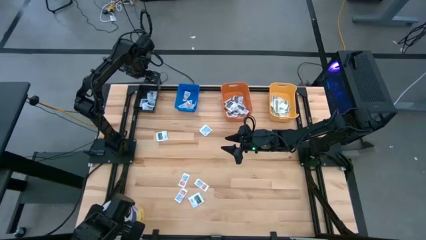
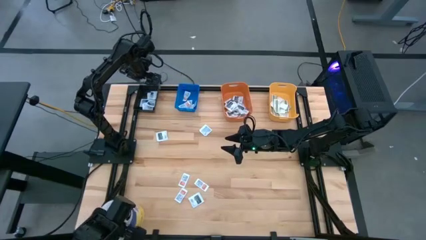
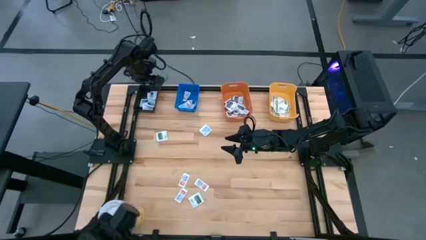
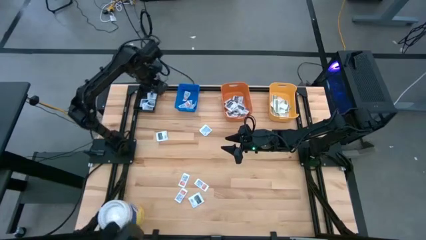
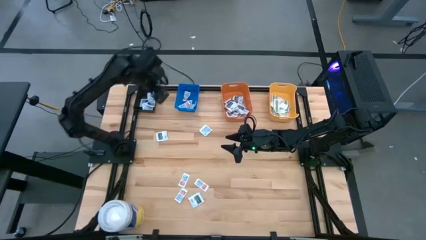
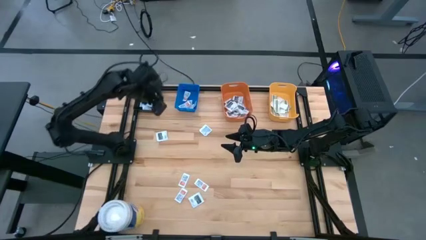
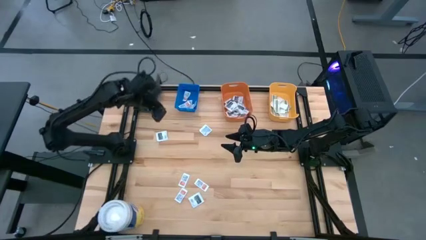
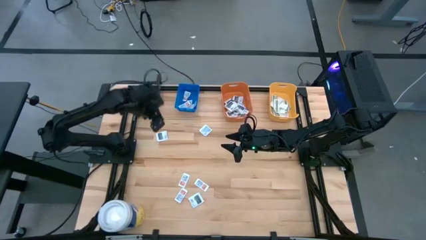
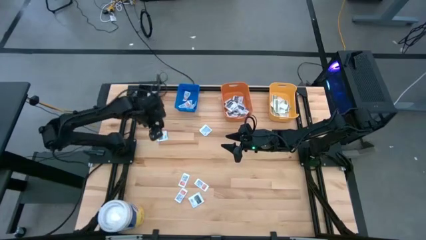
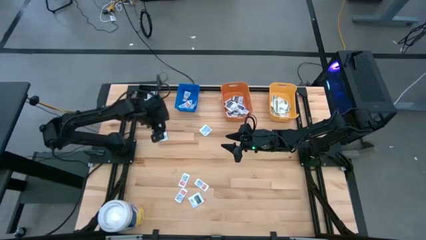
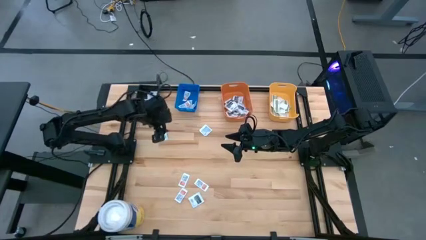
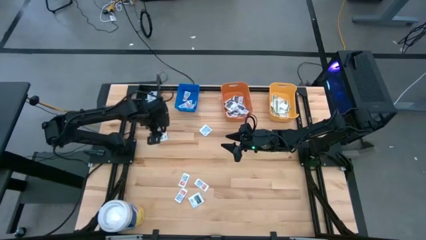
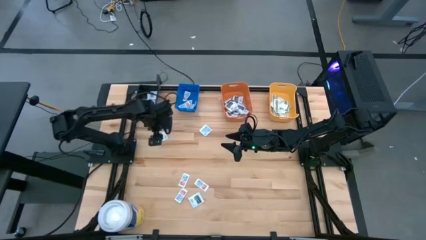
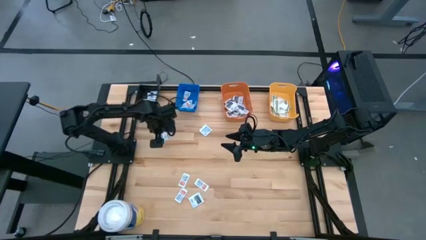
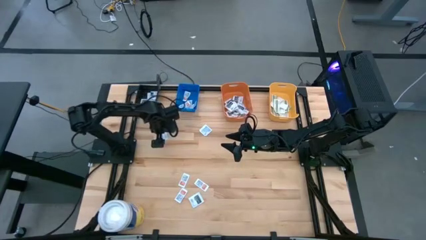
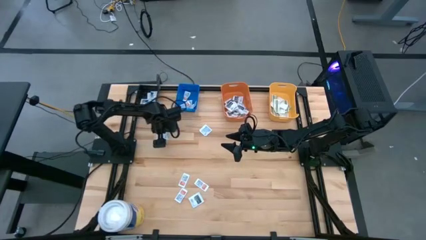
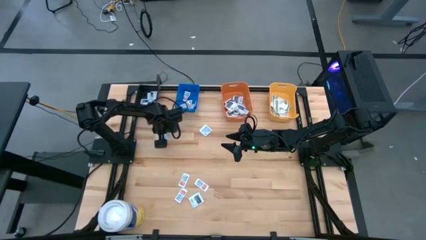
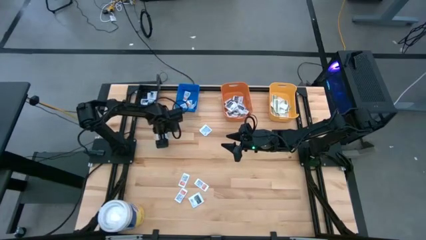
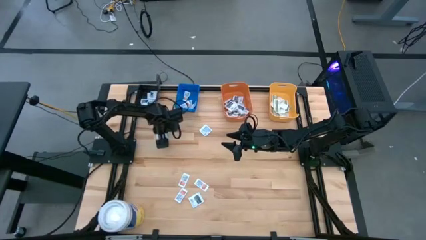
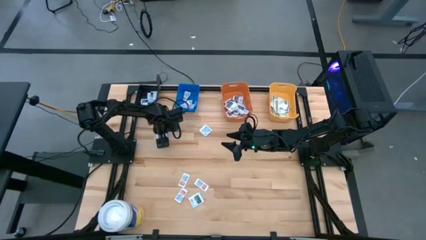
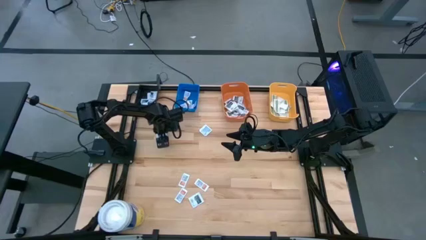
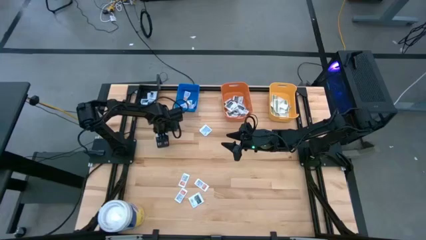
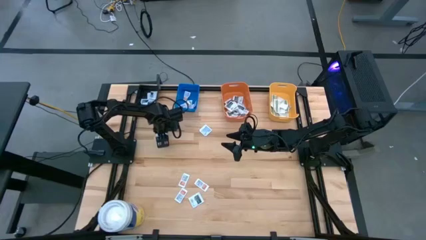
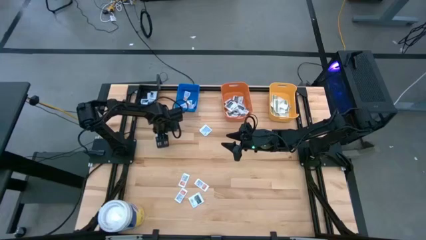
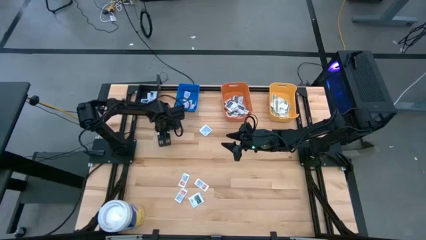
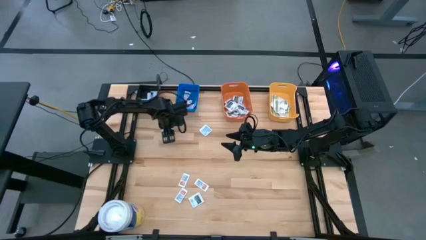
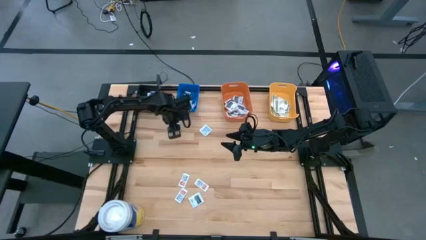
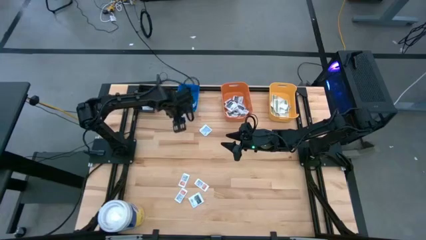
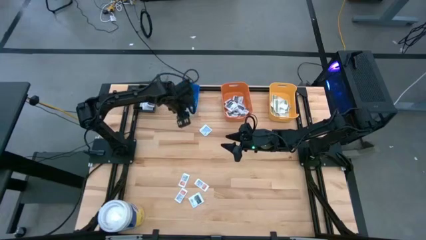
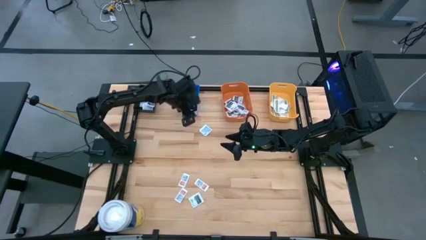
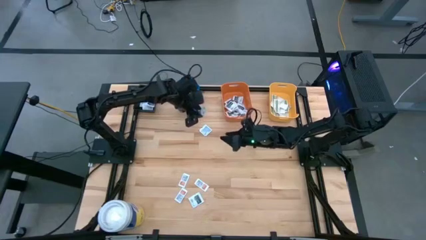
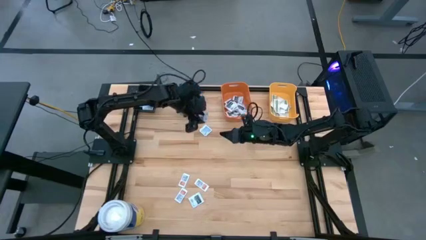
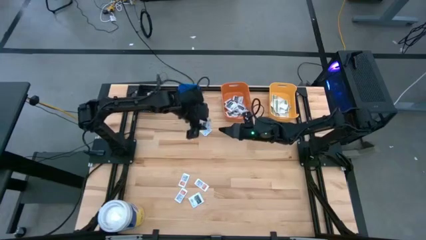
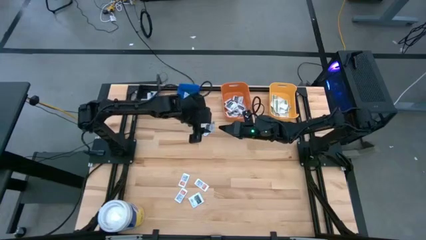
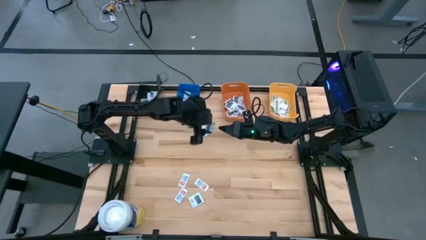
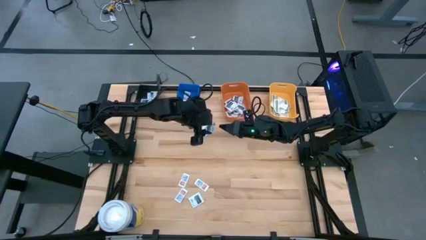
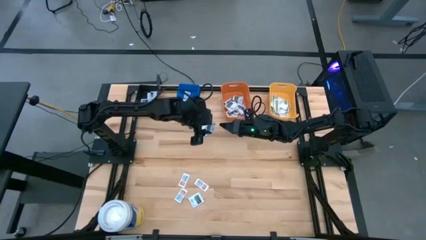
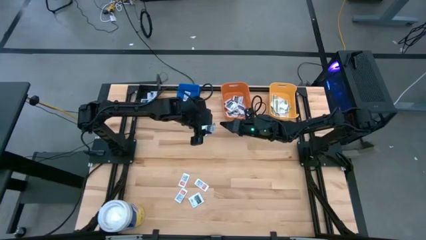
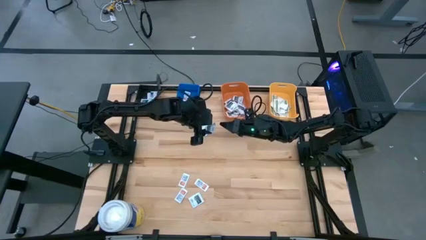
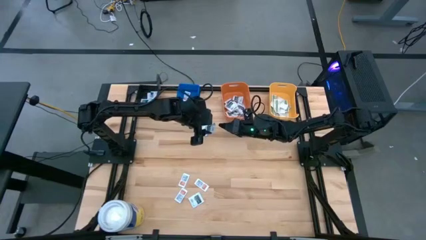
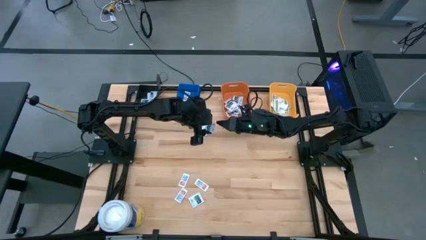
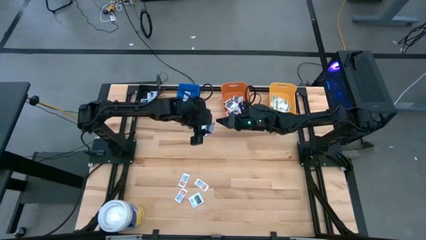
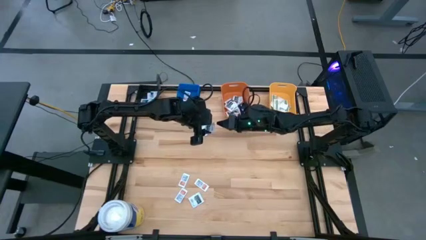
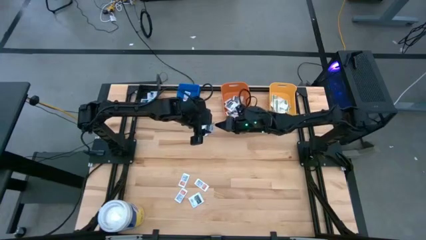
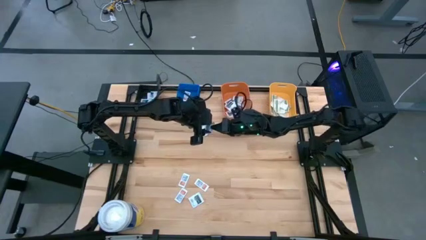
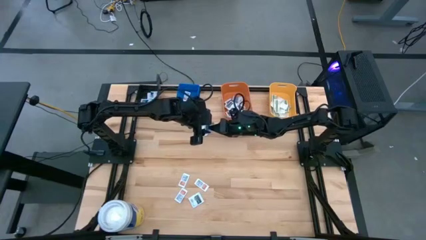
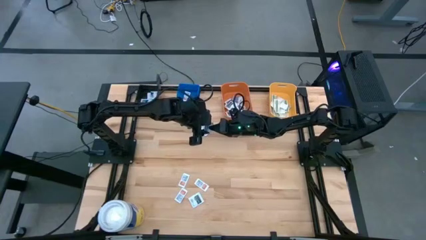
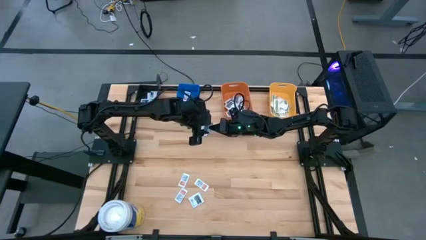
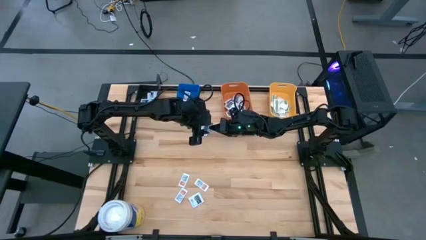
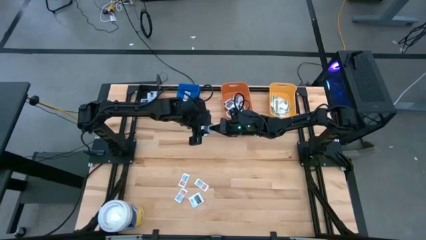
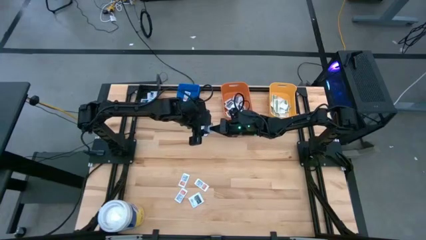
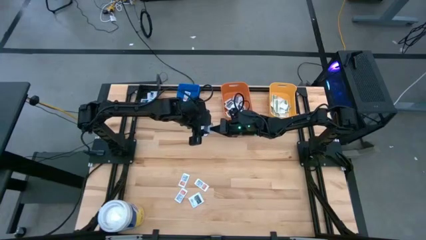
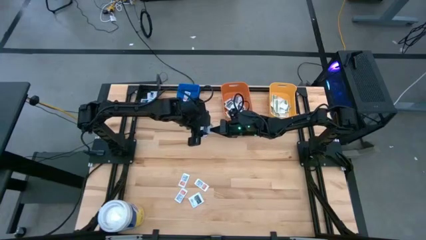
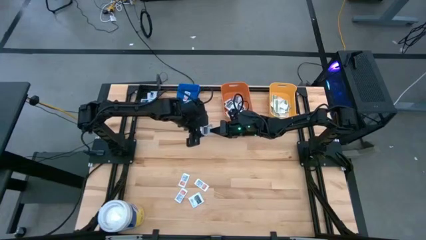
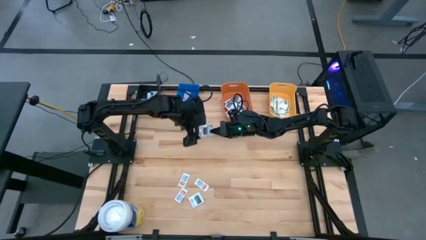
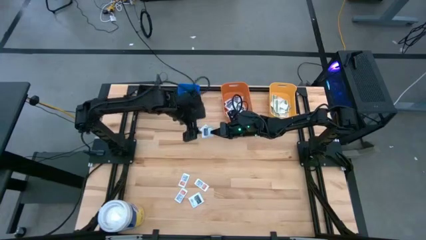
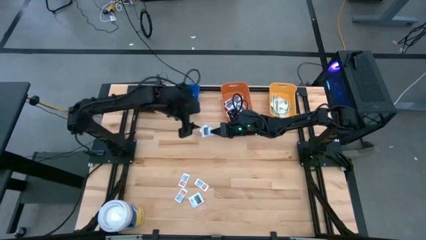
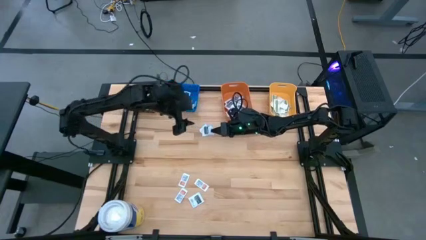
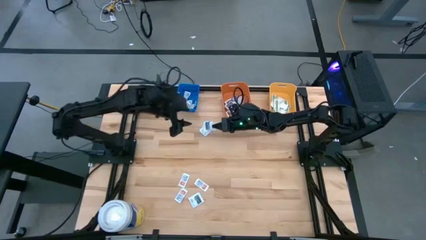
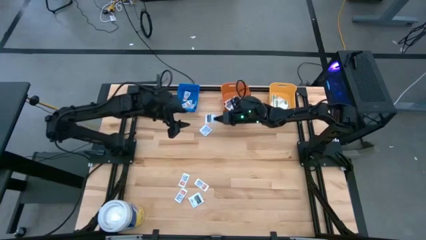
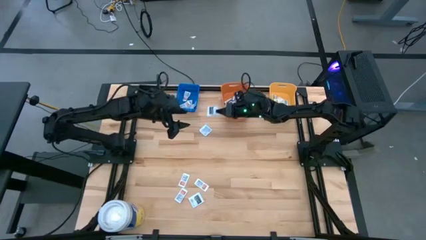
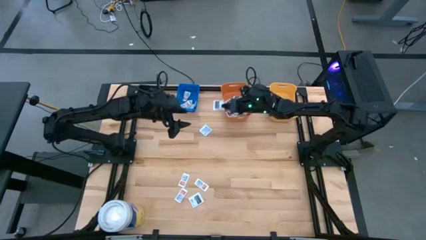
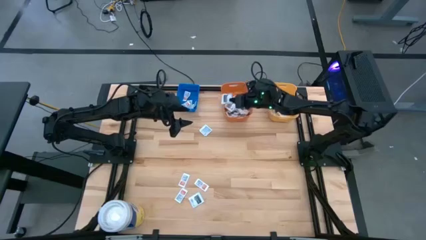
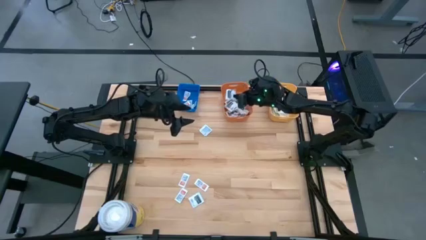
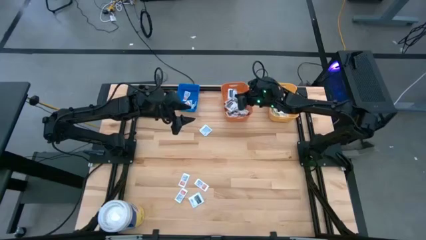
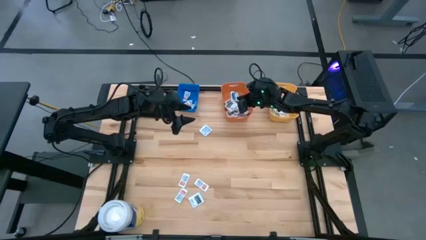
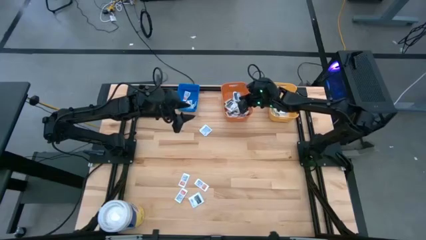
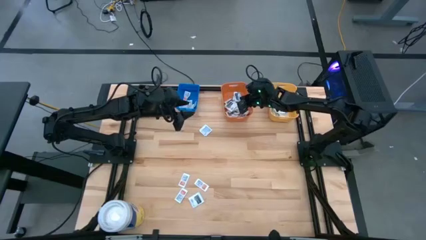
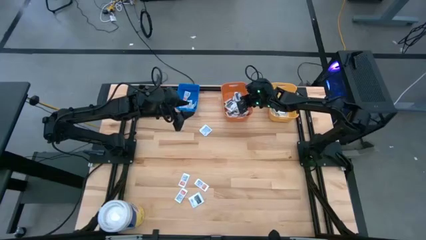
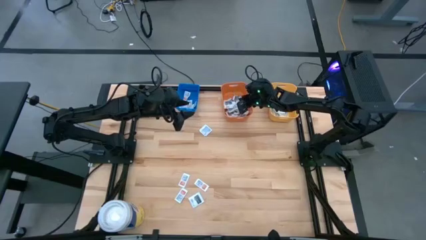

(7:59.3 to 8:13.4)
Task: Pick & Place First Aid Supplies
Put the towelette pack into the orange bin

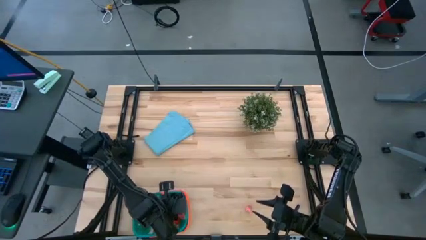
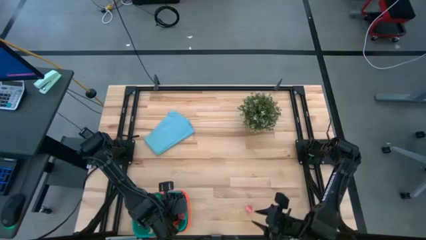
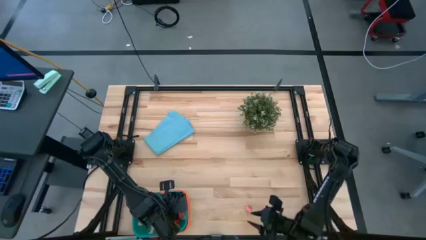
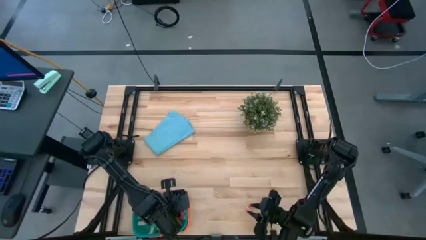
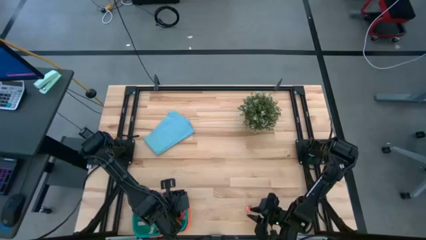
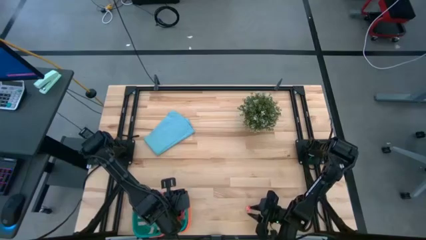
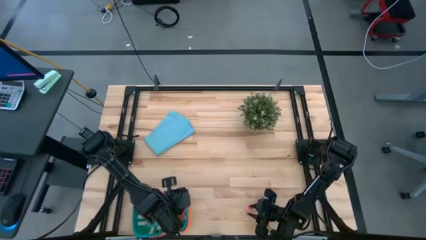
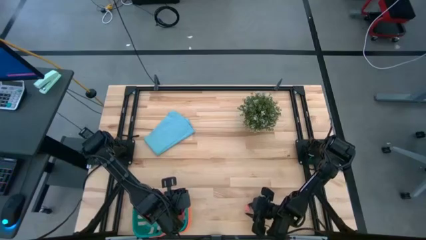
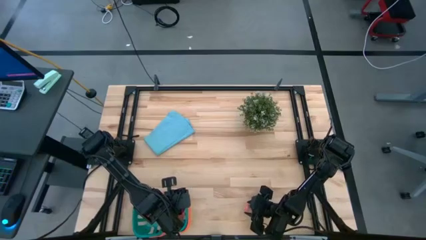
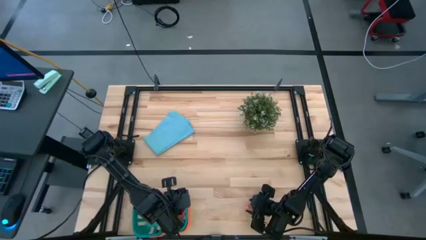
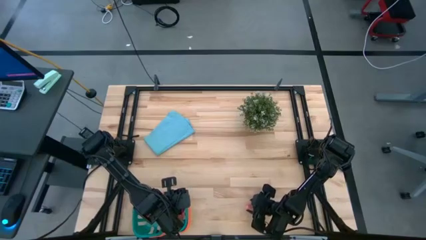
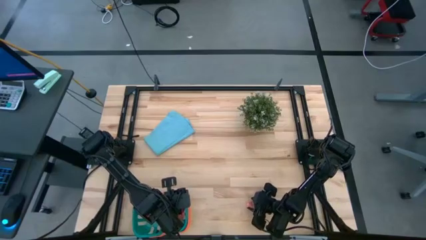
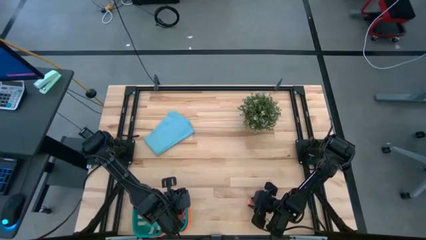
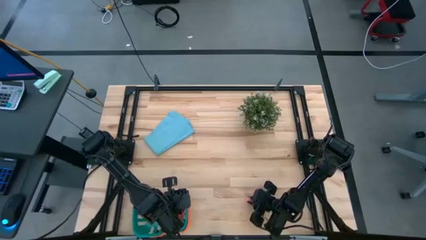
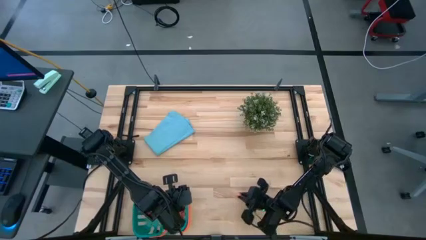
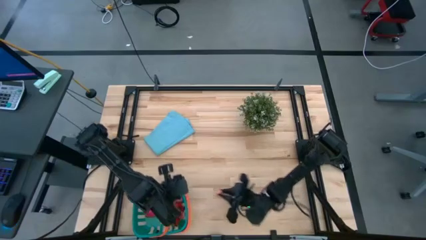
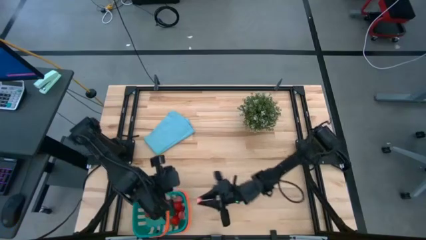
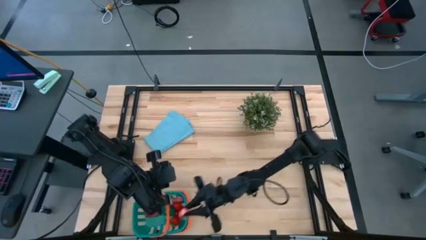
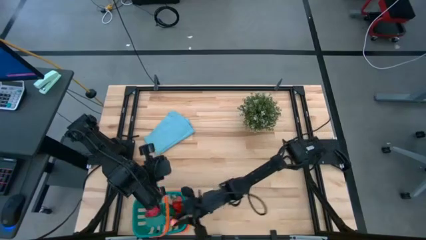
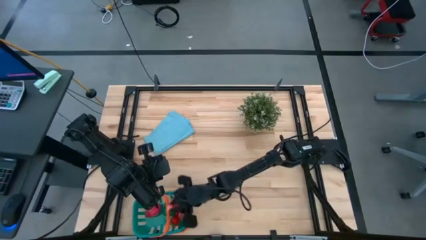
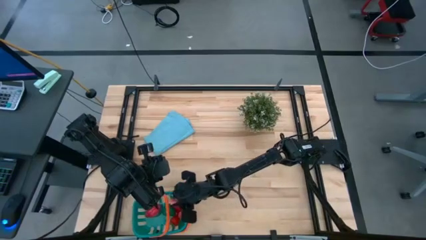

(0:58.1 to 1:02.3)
Task: Pick and placing Produce into tupperware
Put the pink peach into the blue basket
